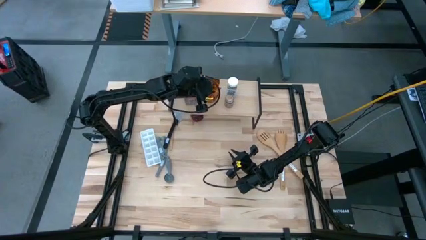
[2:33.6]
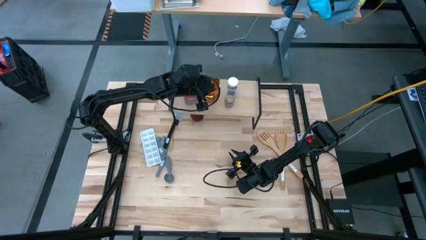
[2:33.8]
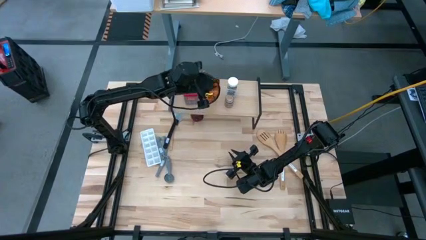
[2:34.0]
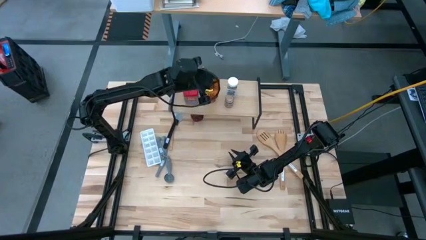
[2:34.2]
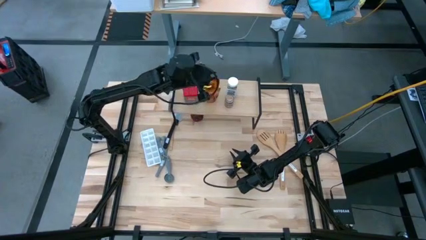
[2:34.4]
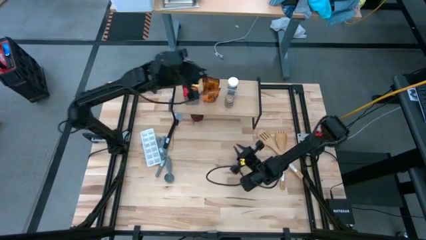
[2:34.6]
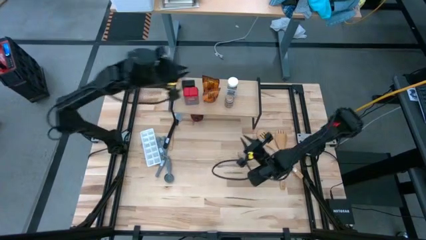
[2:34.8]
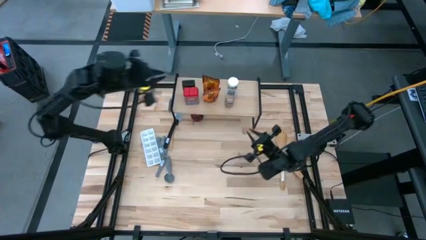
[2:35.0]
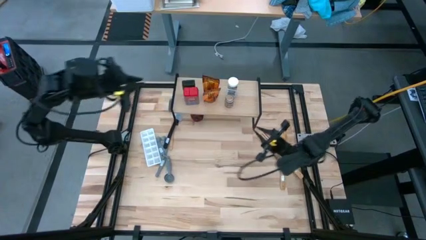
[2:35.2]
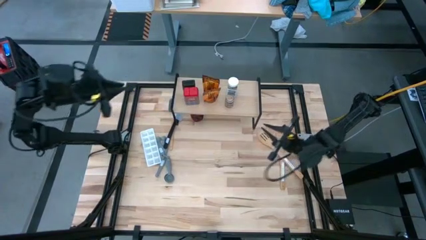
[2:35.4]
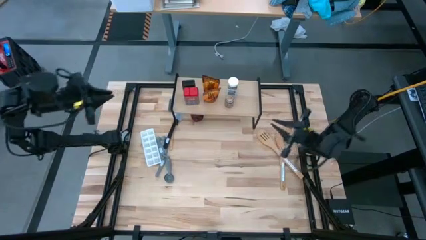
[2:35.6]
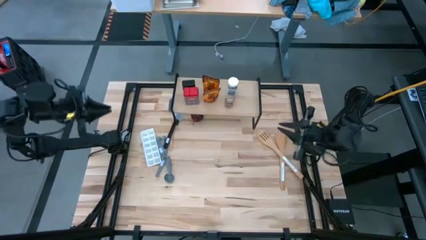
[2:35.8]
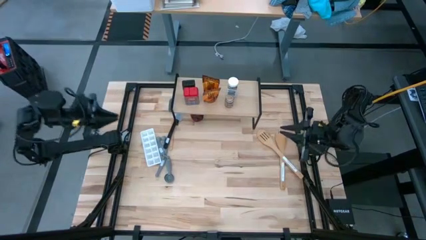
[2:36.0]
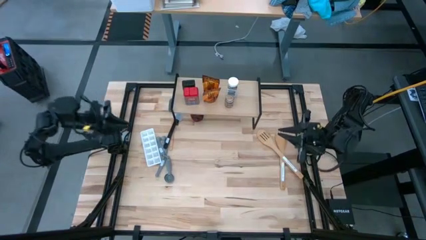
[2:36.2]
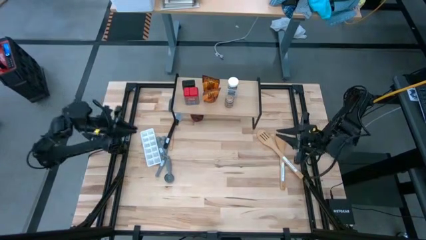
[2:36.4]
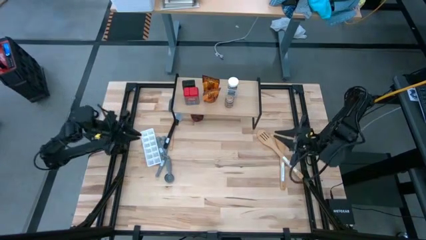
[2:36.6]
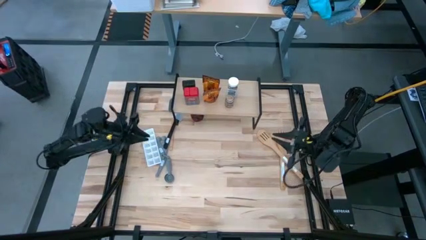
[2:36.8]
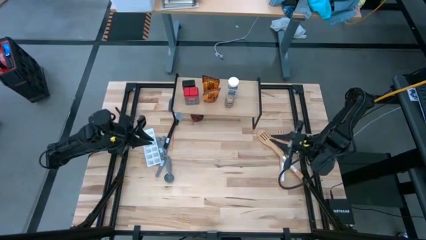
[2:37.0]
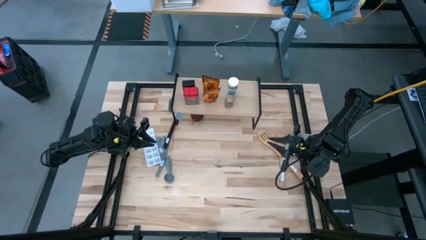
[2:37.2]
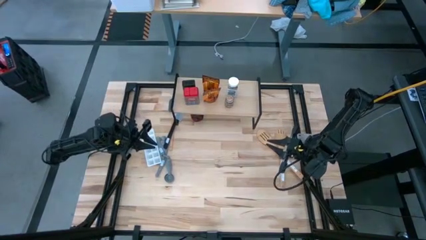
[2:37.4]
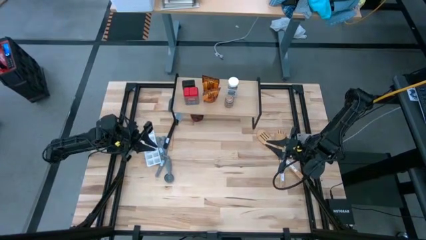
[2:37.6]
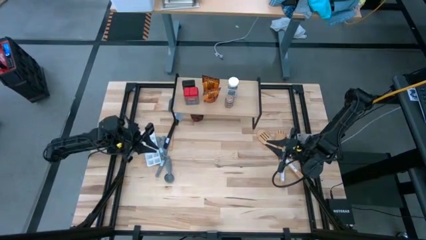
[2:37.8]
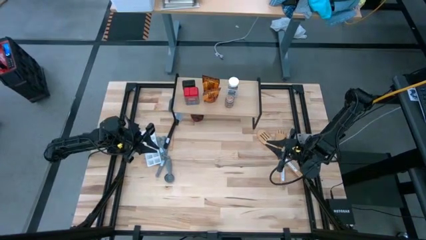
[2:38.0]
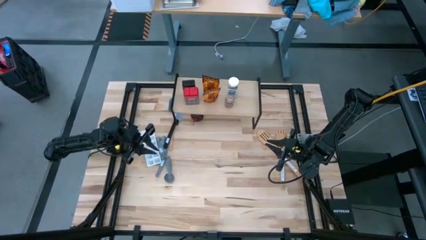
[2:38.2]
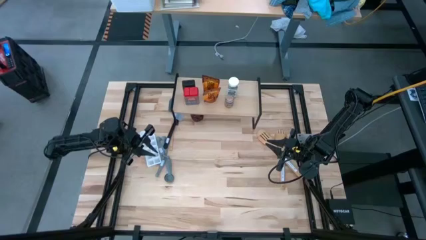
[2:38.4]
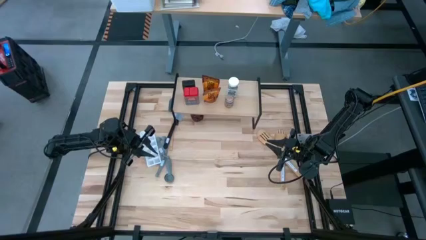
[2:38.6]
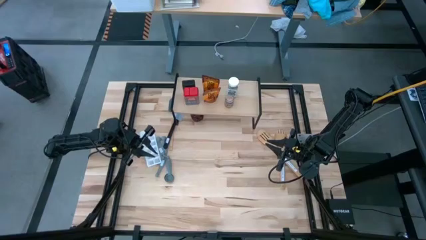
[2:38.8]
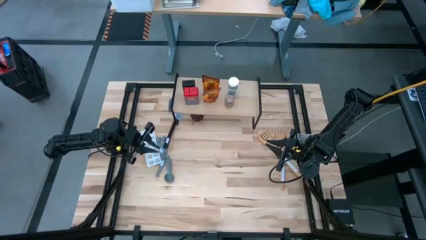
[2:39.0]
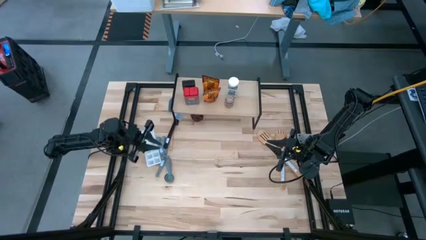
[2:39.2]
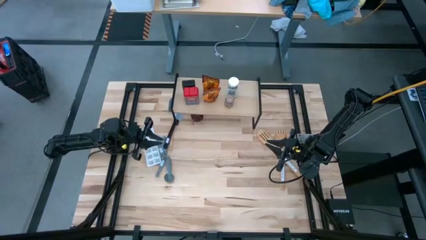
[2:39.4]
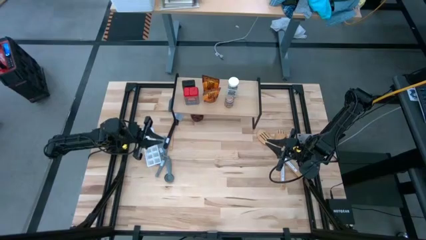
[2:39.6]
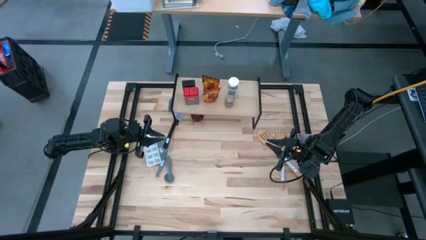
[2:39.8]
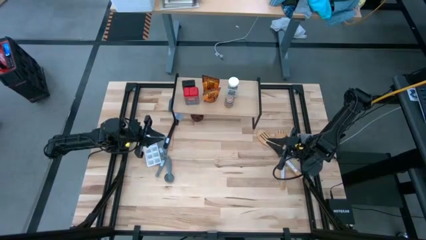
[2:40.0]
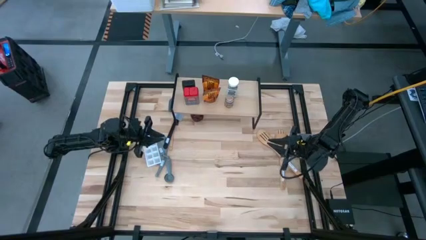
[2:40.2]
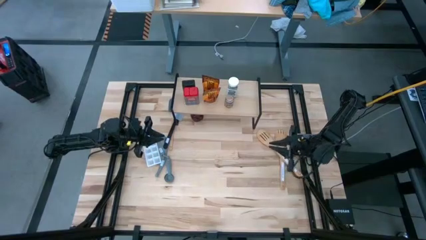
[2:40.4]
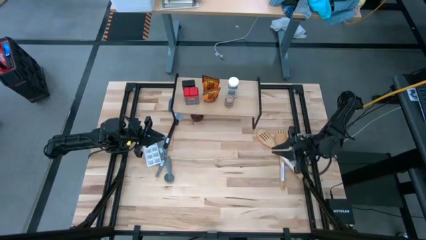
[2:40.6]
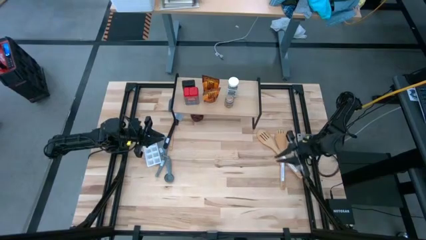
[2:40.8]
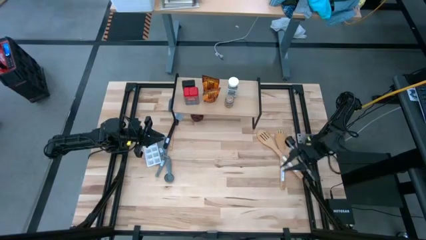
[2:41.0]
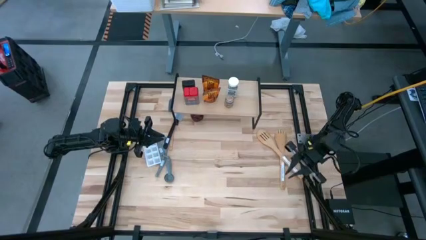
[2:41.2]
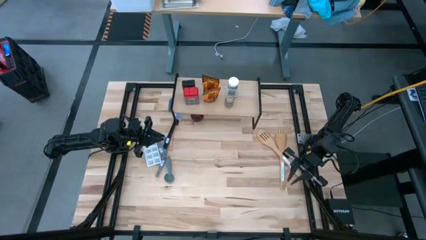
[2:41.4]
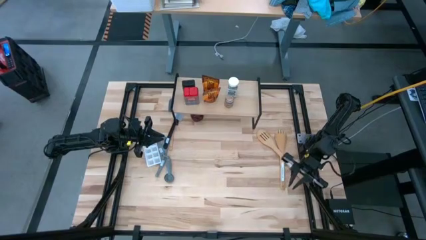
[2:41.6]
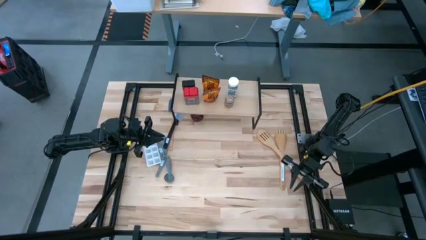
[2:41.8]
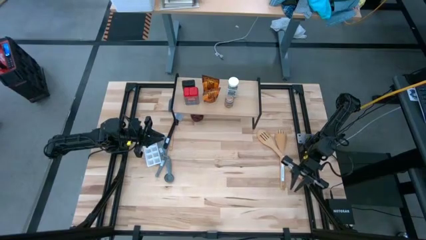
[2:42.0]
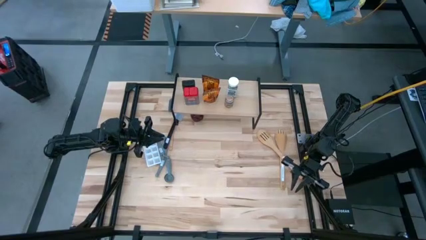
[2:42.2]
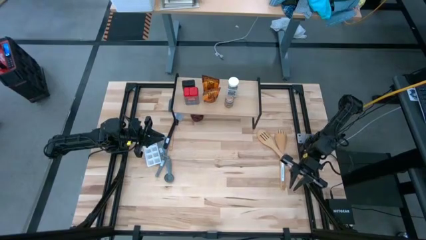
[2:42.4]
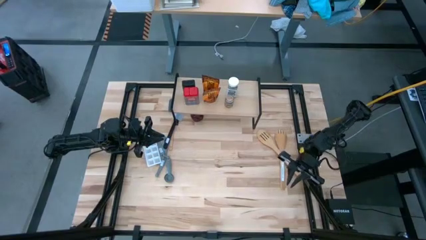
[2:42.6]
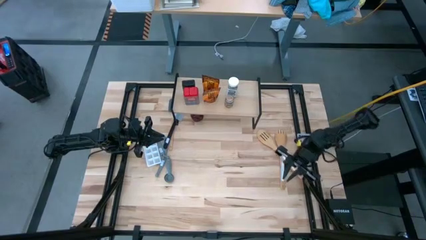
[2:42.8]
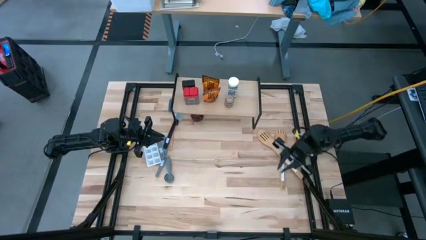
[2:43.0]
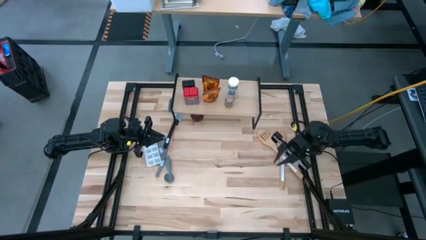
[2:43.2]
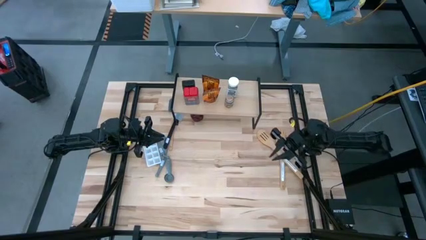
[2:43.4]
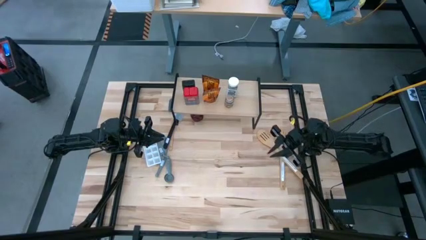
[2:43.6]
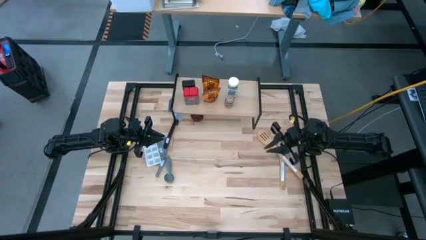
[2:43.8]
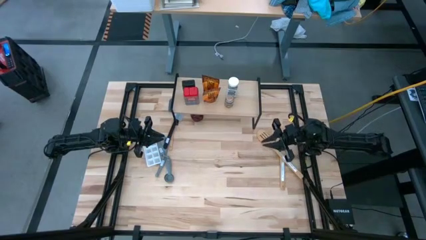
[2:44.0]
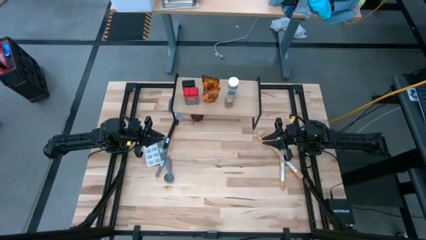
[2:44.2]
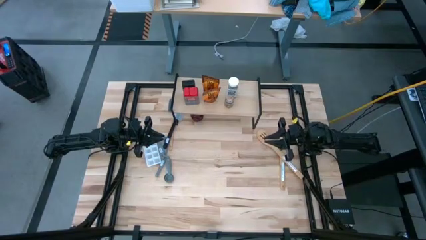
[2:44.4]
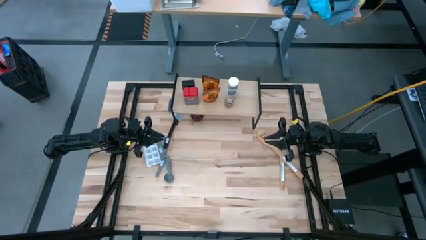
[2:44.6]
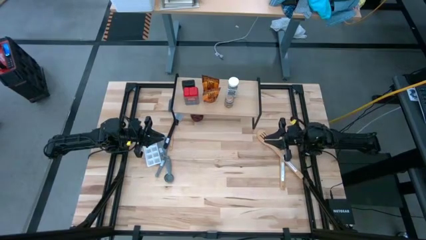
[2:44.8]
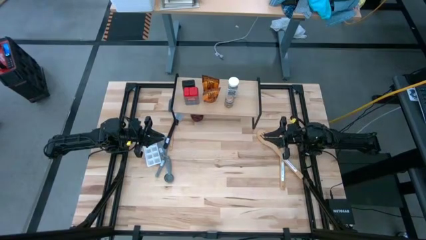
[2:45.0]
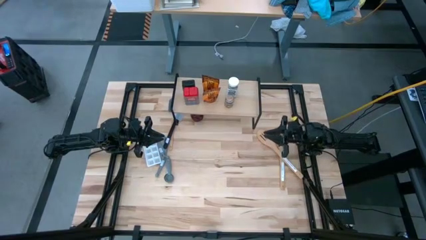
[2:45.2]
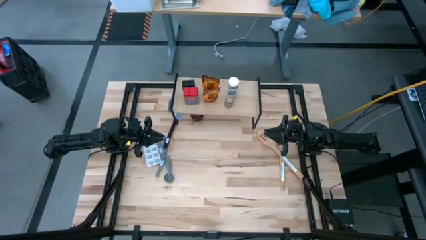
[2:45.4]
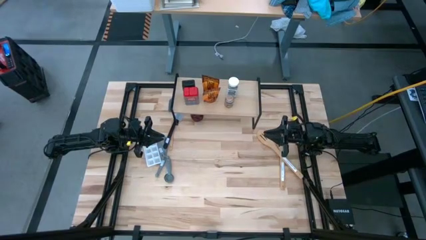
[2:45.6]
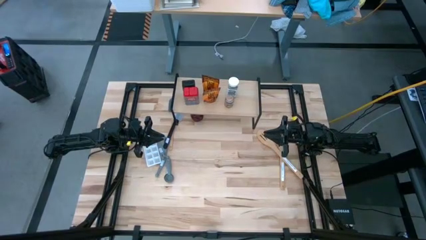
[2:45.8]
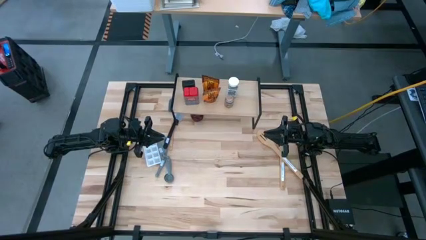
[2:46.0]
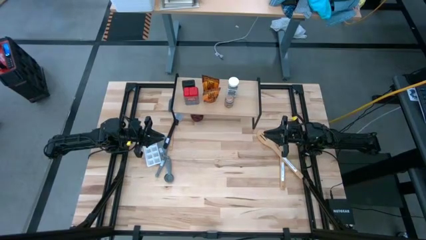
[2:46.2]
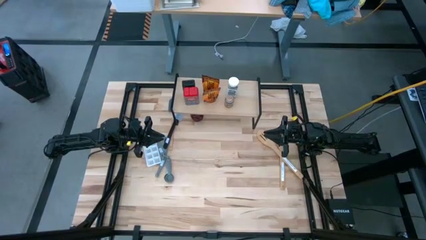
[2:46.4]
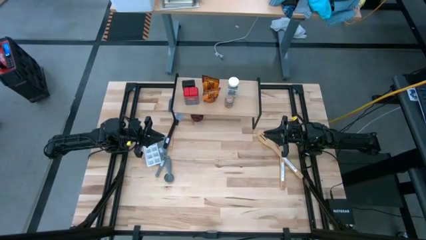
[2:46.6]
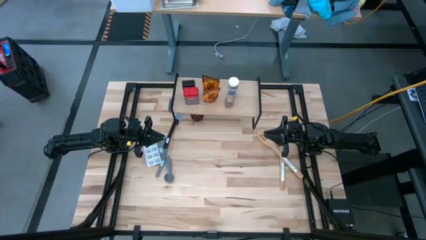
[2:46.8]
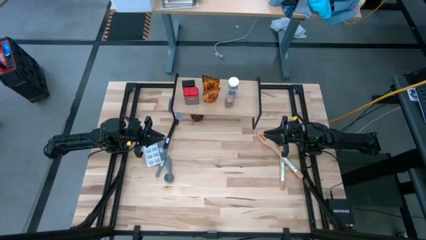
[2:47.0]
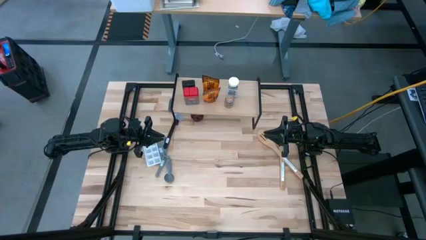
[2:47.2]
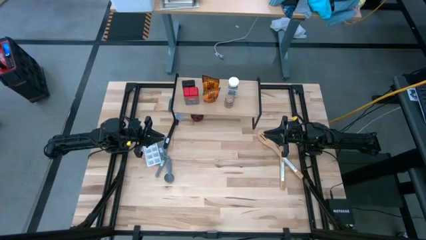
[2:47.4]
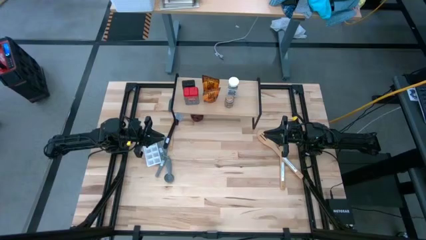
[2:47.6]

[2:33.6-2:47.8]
Task: Shelf spices
Return to Home Position

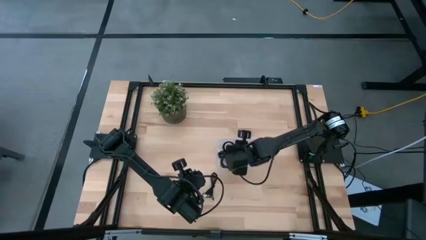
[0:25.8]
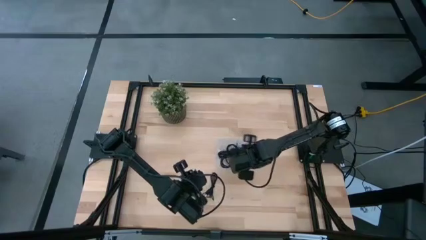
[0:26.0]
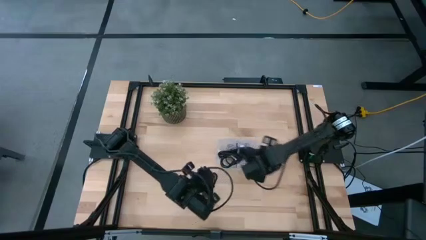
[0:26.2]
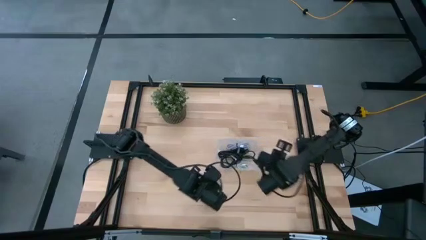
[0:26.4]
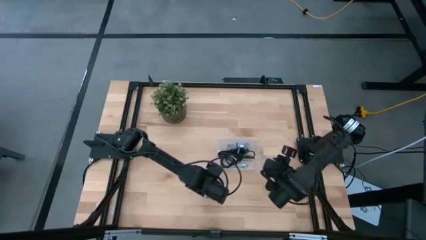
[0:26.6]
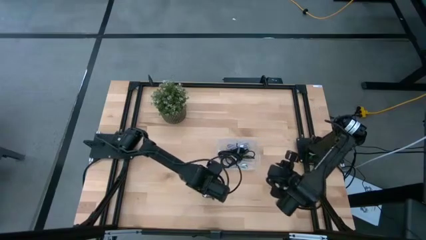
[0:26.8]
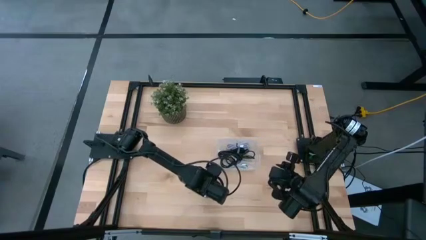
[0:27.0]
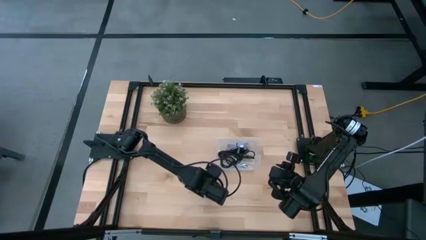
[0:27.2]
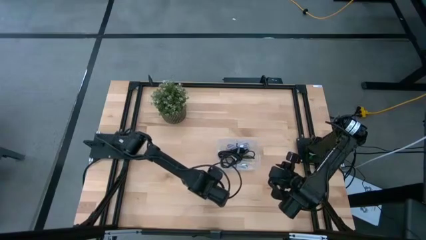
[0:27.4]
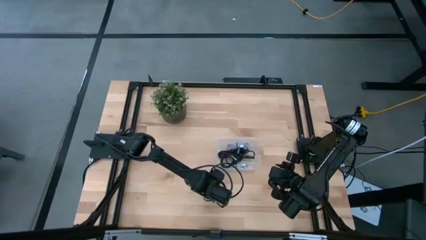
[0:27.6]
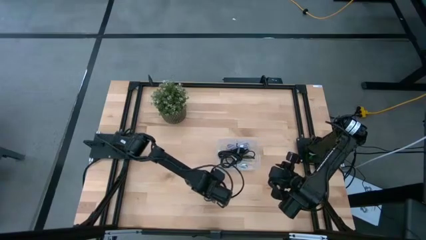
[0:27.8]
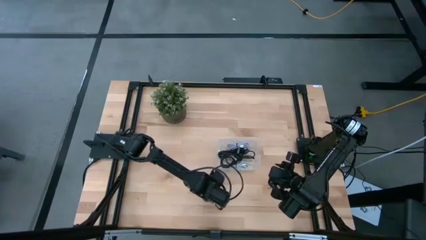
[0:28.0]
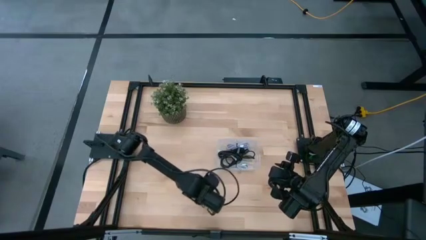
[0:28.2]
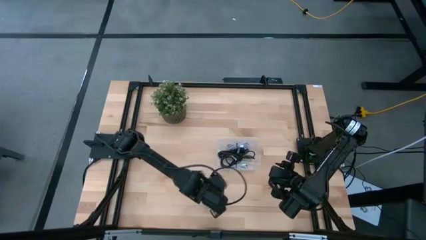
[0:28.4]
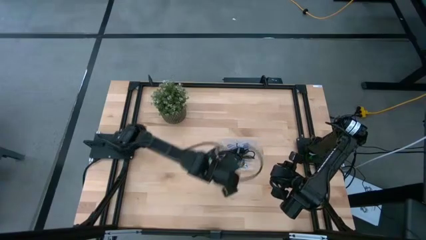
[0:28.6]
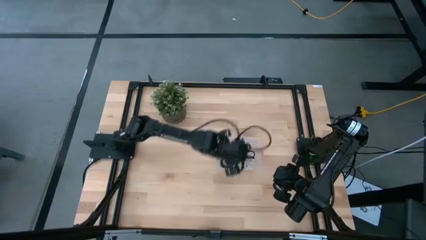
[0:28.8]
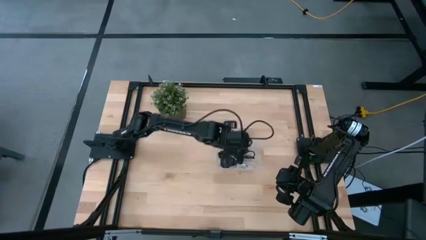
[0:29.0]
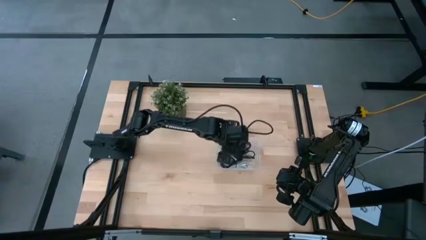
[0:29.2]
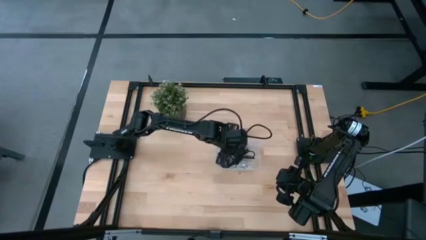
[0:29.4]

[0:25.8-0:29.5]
Task: Pick and place USB-C Cables
Put the black charger cable wire into the bin
